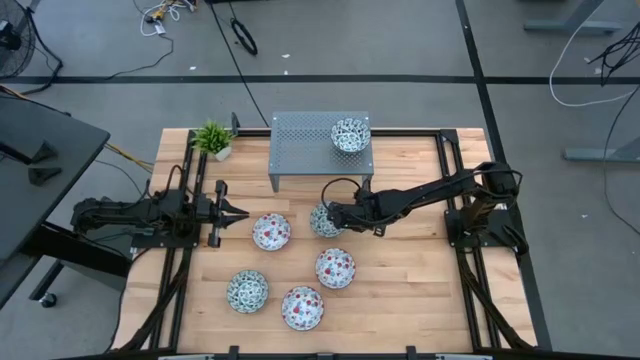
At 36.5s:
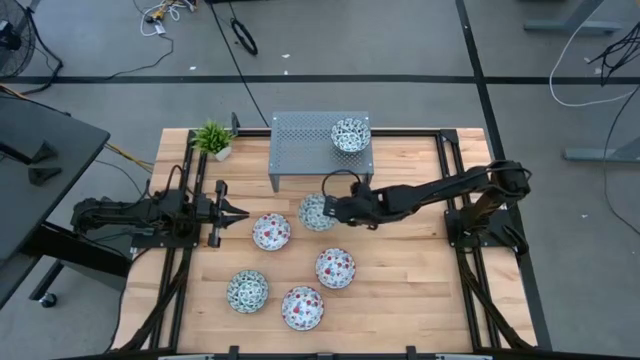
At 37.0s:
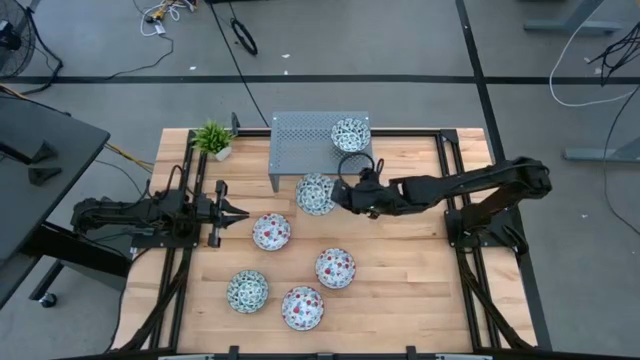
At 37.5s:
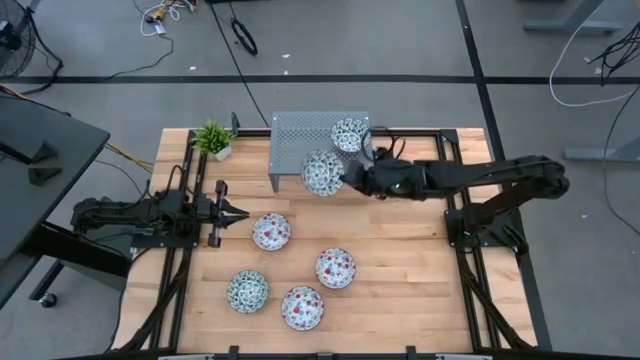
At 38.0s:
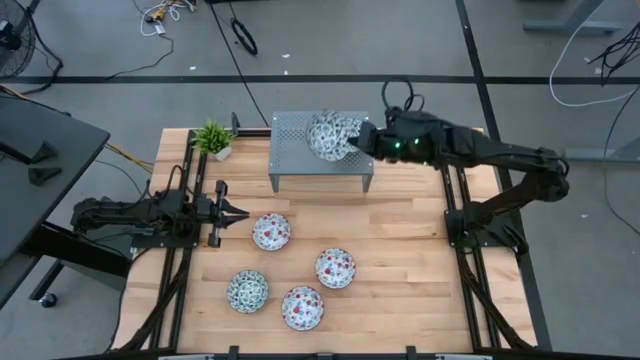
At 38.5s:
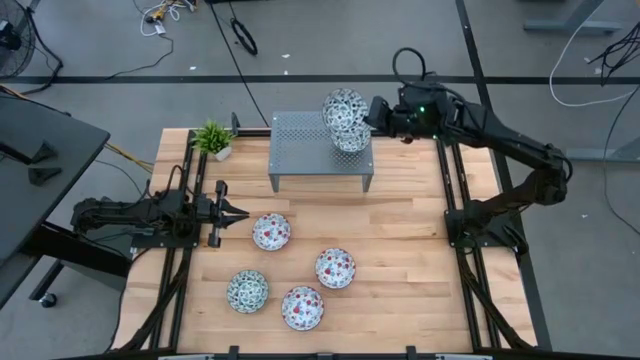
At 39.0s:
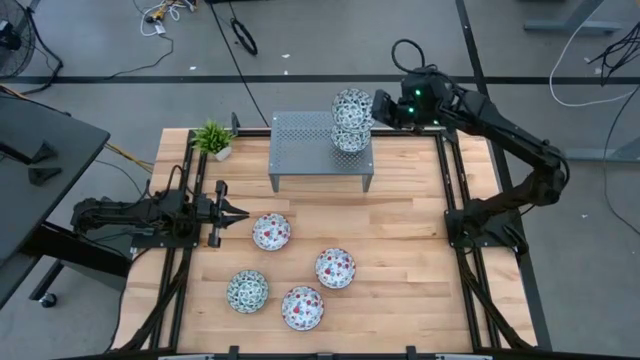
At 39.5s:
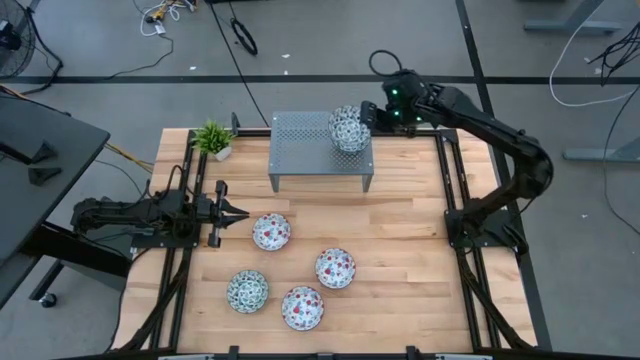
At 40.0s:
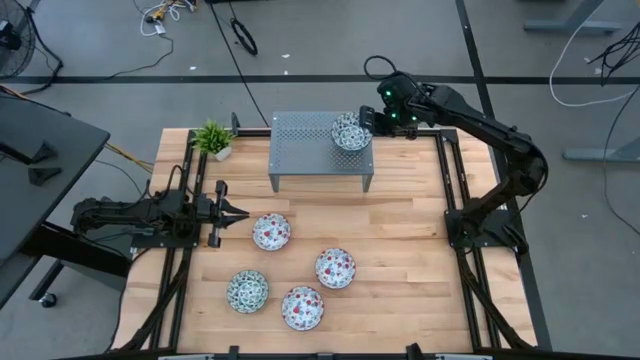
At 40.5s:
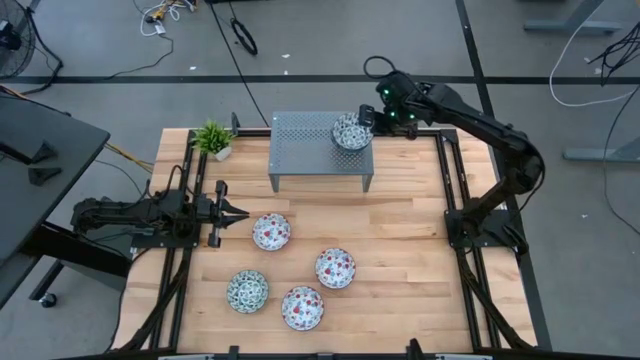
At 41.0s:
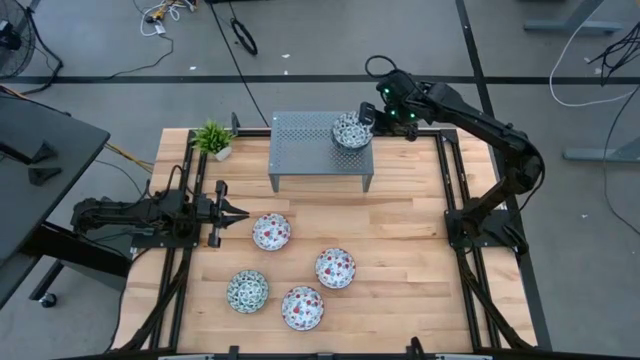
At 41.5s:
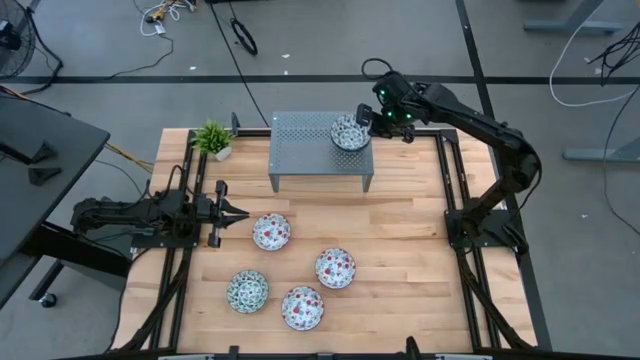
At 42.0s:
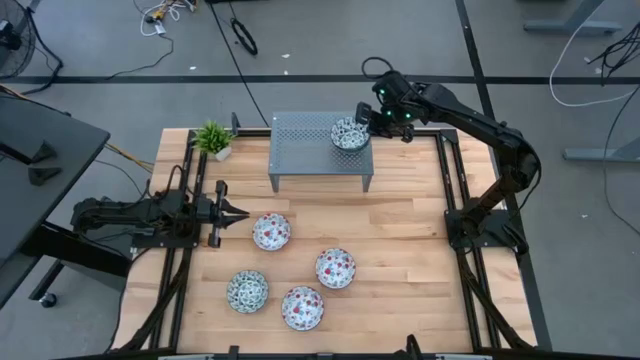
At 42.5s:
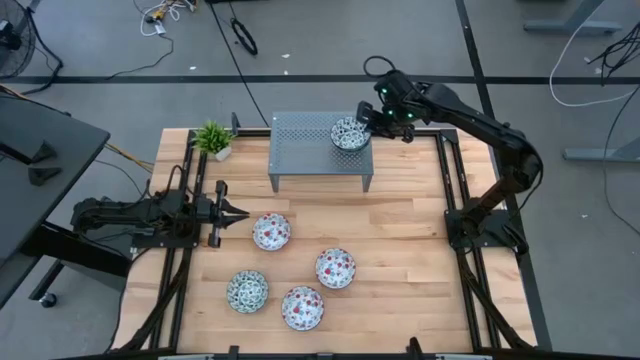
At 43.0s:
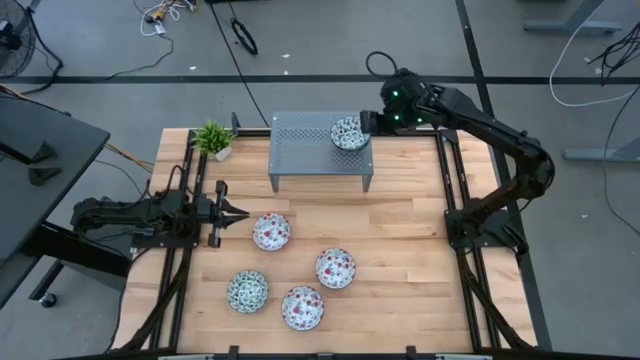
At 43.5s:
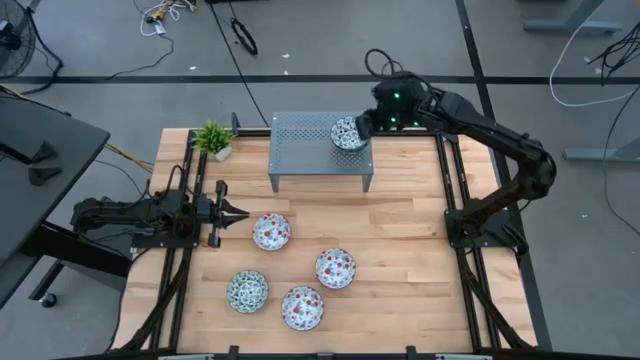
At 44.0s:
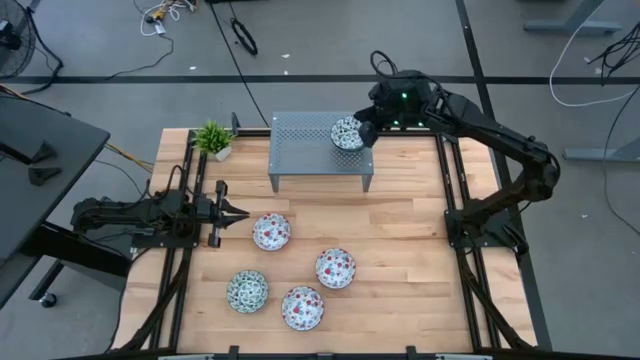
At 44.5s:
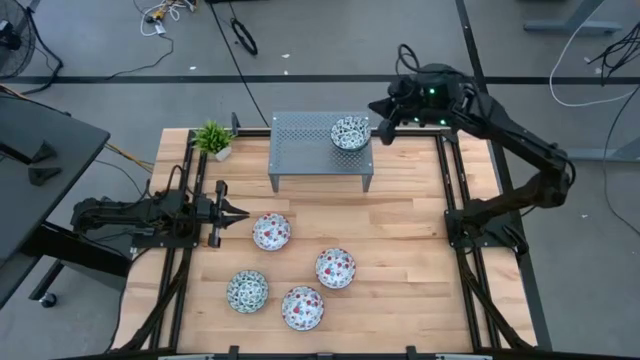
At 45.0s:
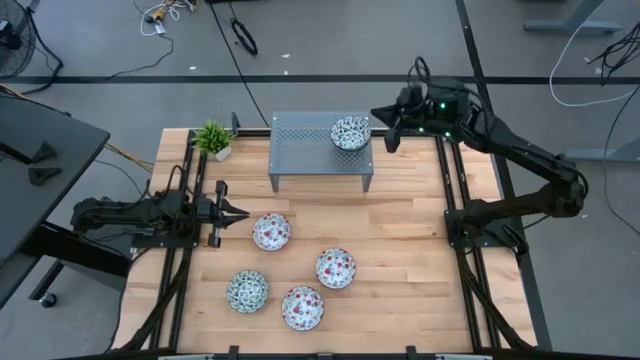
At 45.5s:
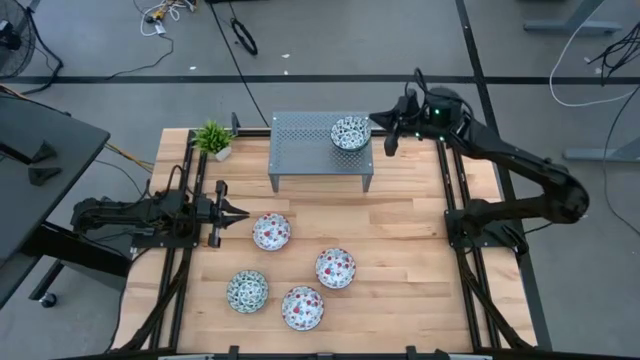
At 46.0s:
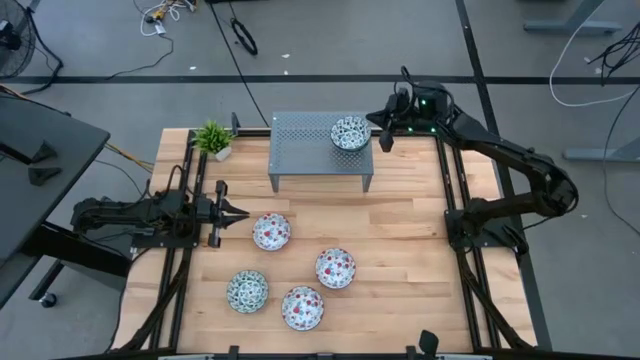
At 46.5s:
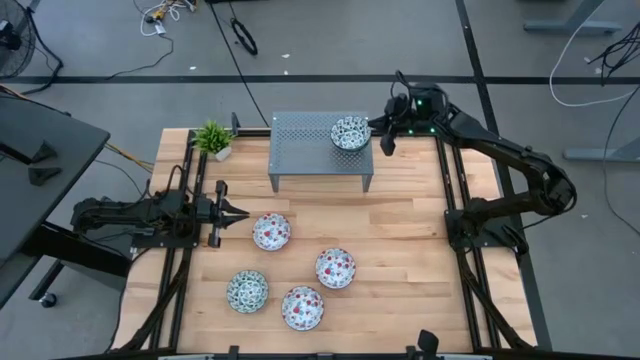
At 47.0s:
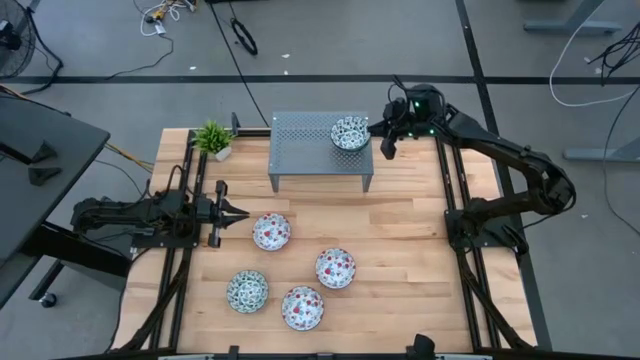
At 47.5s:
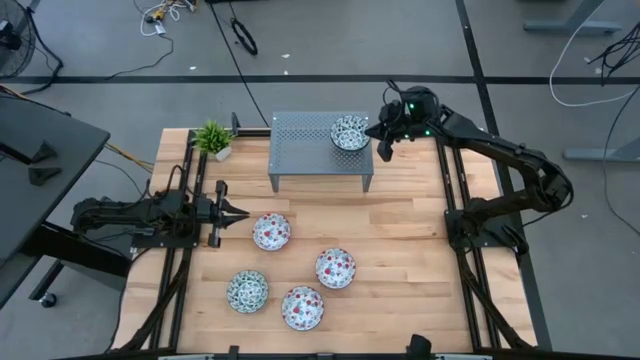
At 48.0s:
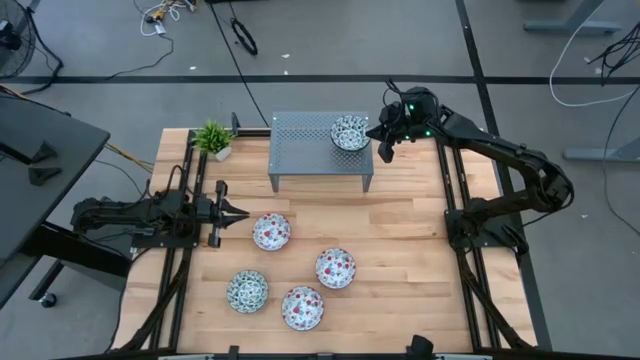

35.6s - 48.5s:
Task: Pick & Place Mini bowls
Stack the top blue and white patterned bowl on top of the other blue and white patterned bowl on the shelf

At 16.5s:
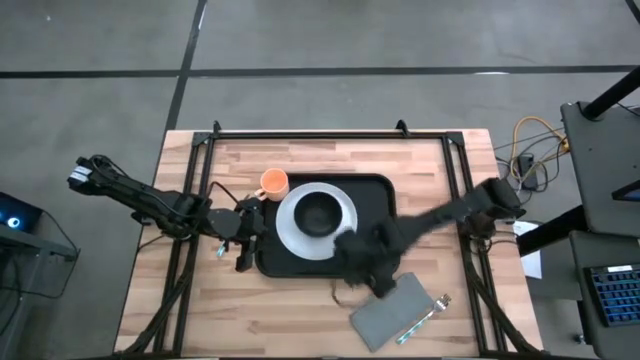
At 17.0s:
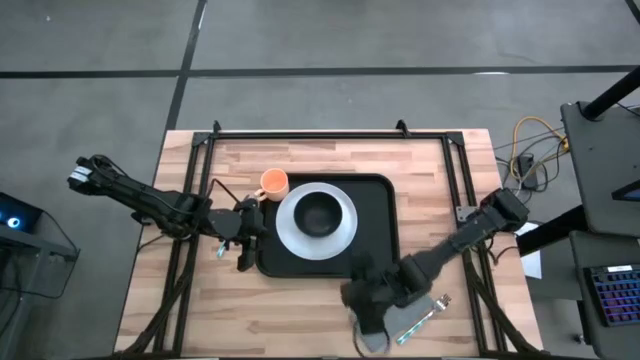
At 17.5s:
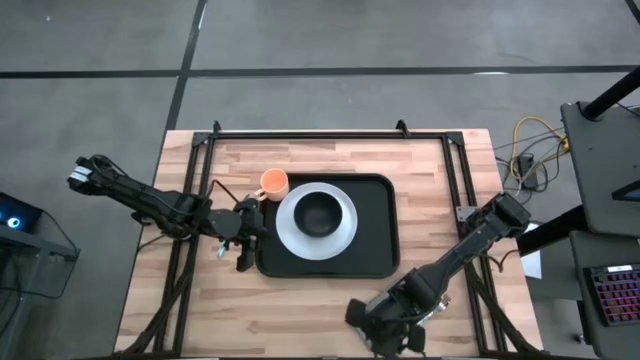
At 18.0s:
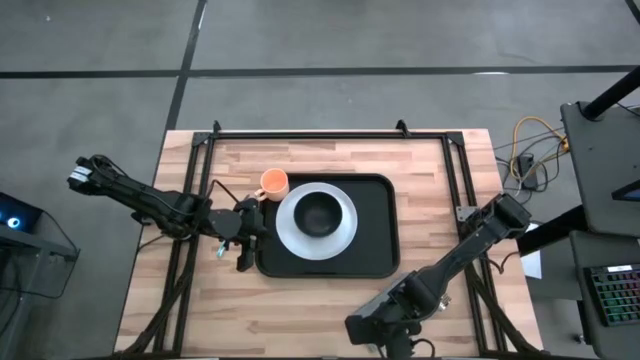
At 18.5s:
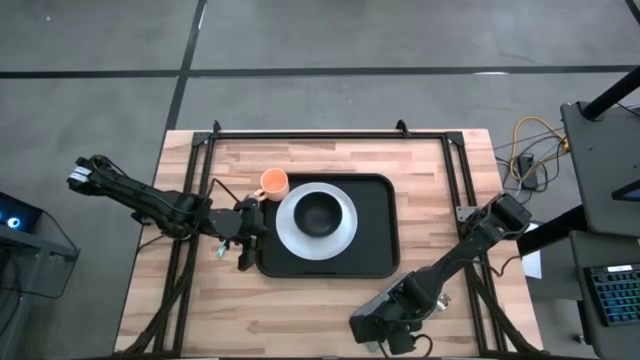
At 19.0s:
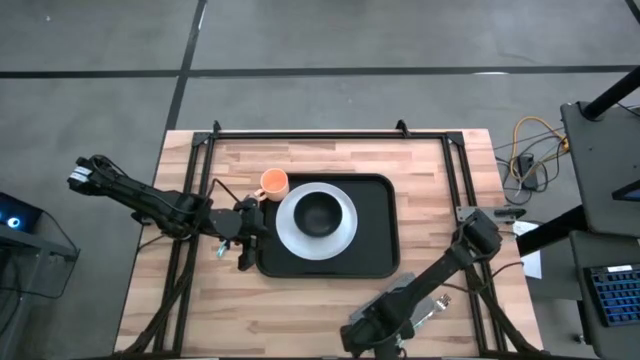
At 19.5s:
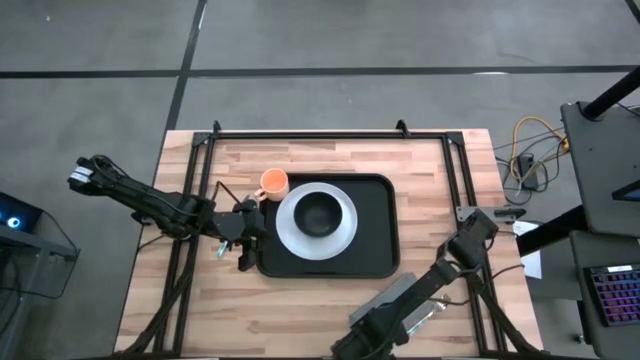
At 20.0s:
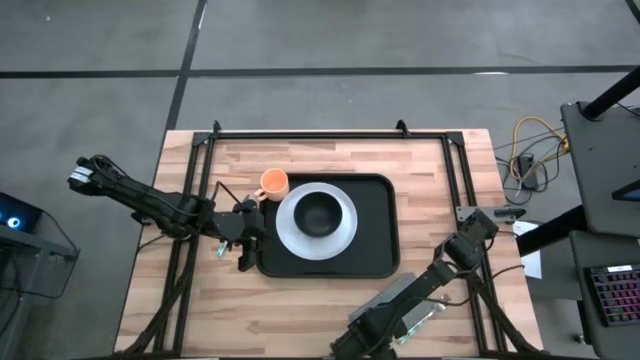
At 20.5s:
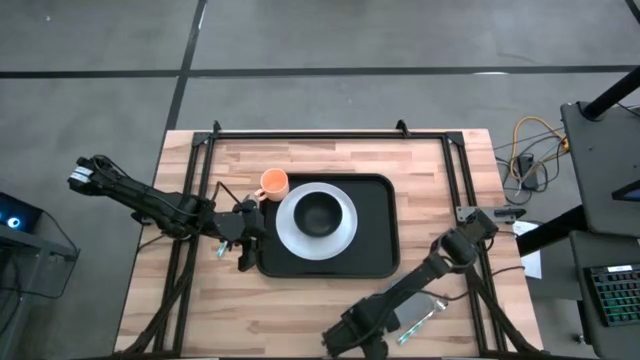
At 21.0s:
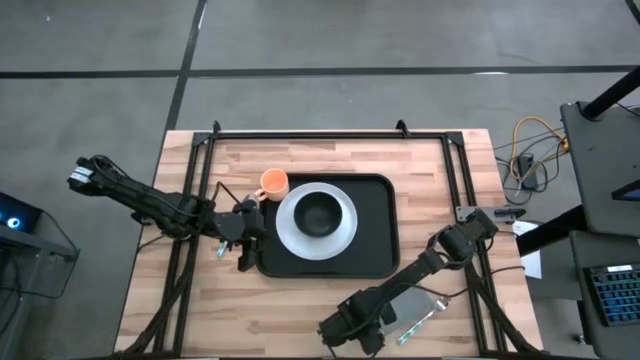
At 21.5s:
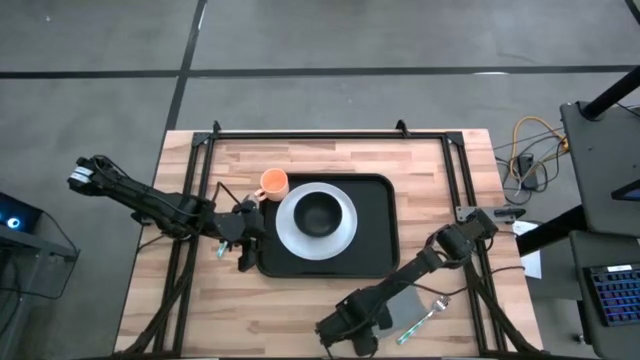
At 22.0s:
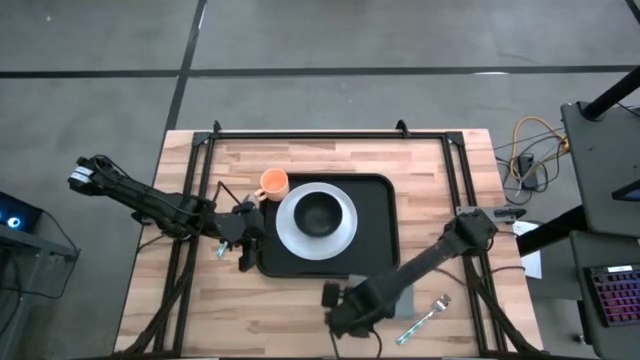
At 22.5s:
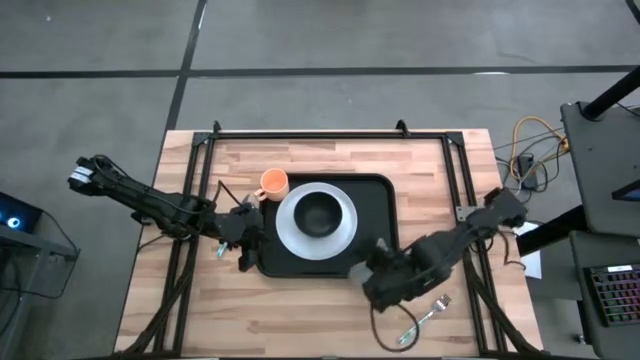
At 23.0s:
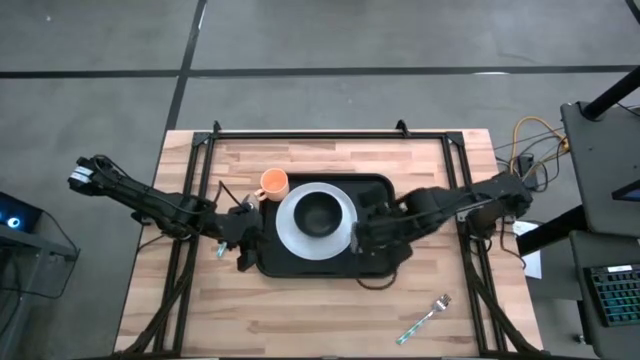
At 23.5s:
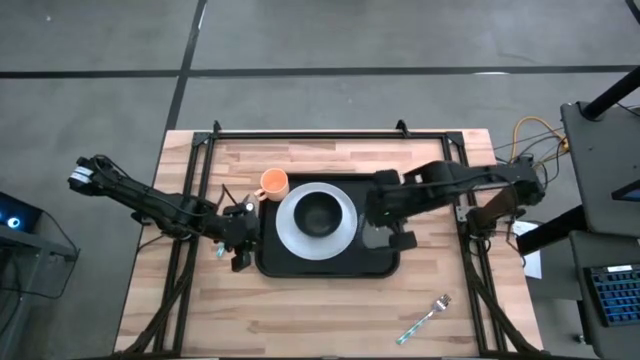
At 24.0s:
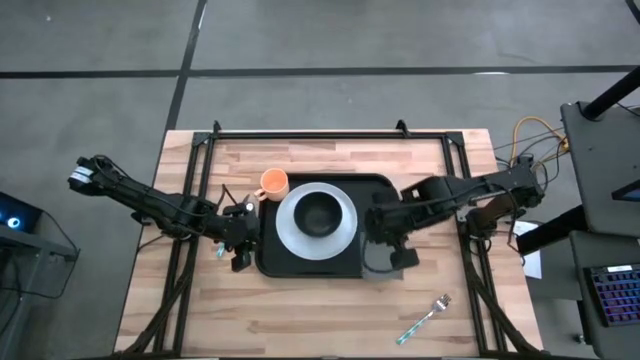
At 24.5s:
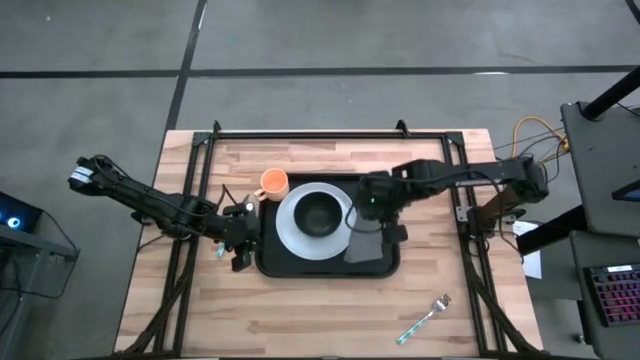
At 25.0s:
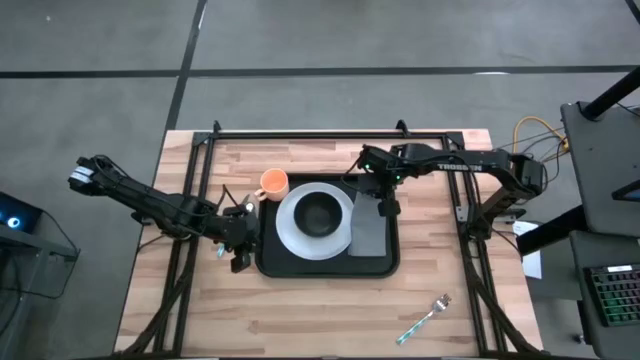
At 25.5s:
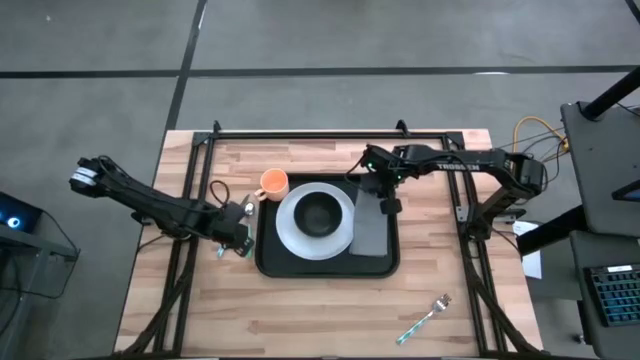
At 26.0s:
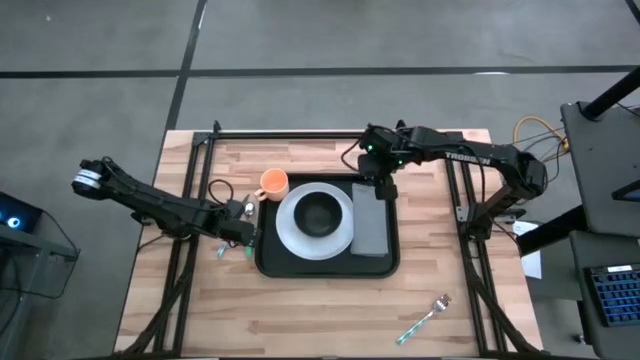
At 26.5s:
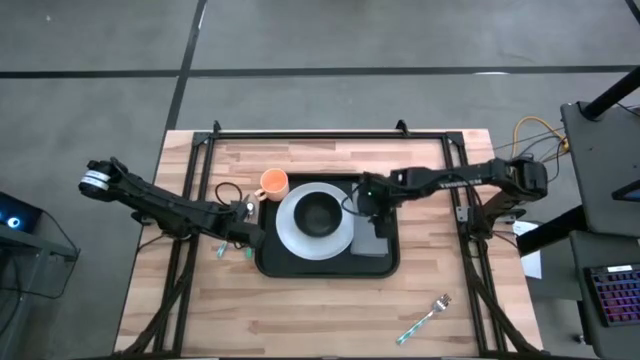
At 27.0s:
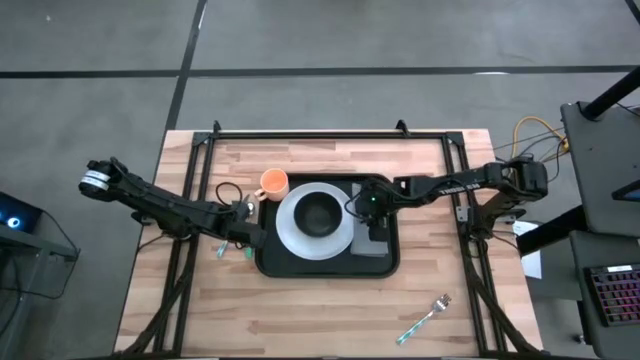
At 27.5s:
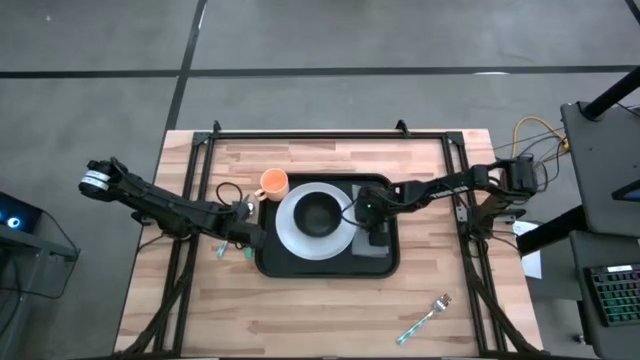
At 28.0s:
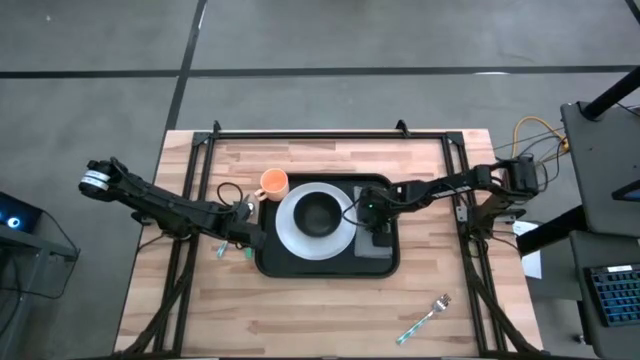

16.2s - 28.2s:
Task: Set up tray
Put the grey napkin on the black serving tray to the right of the white plate
